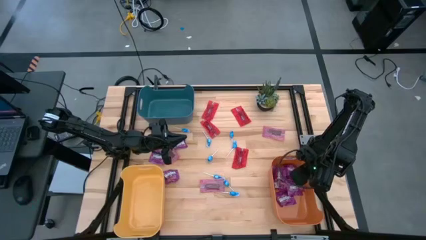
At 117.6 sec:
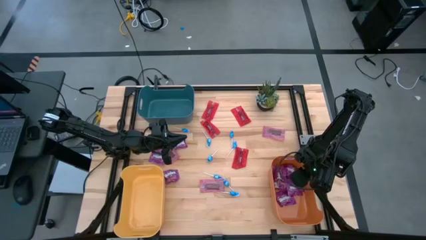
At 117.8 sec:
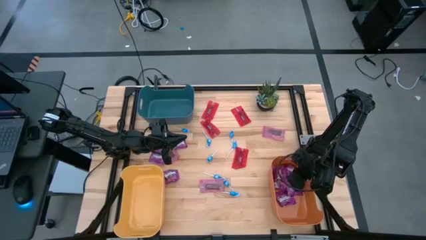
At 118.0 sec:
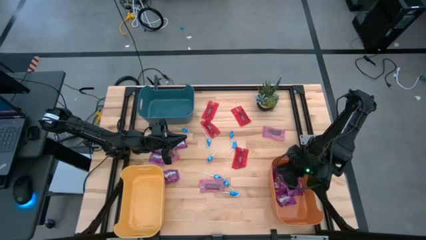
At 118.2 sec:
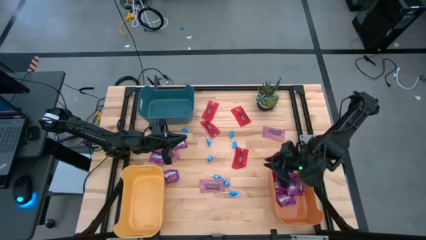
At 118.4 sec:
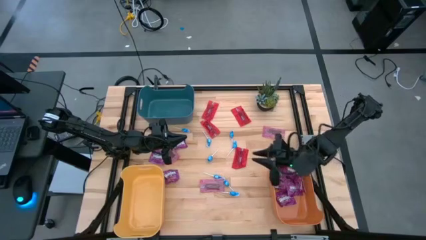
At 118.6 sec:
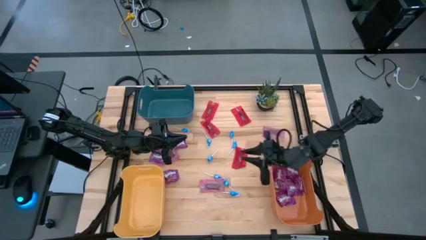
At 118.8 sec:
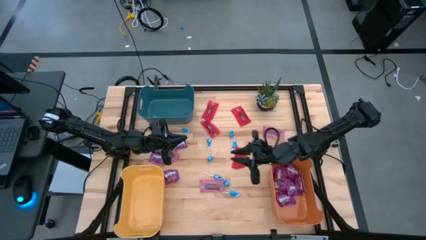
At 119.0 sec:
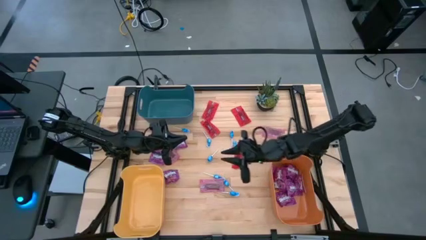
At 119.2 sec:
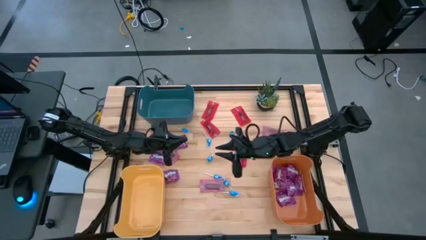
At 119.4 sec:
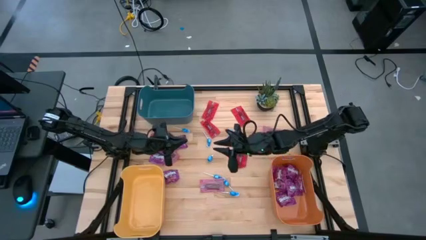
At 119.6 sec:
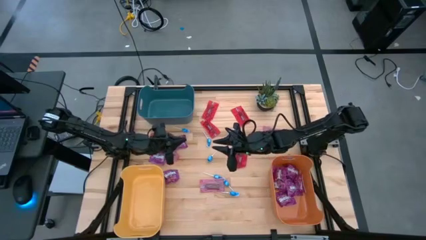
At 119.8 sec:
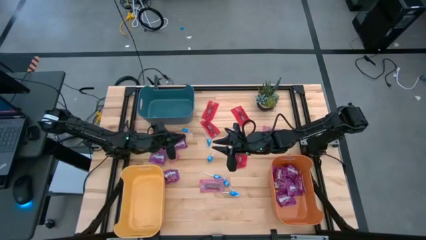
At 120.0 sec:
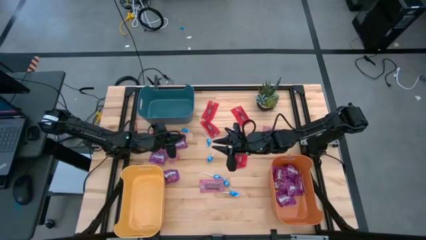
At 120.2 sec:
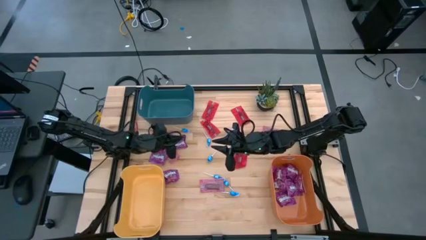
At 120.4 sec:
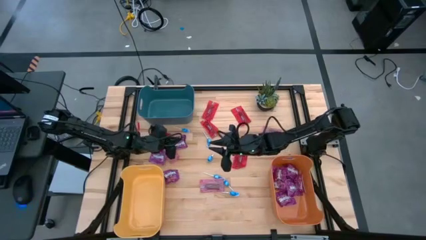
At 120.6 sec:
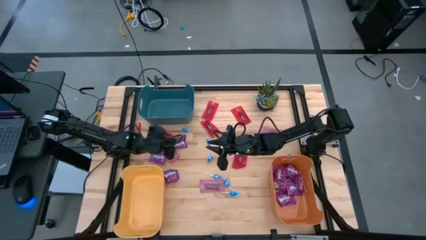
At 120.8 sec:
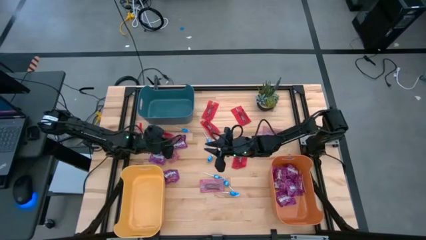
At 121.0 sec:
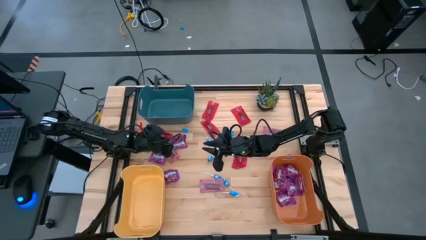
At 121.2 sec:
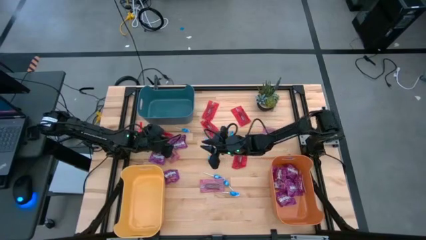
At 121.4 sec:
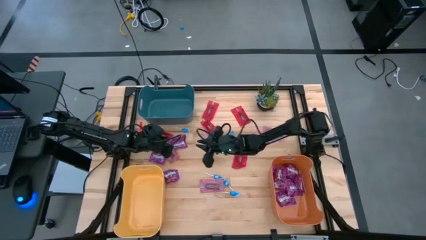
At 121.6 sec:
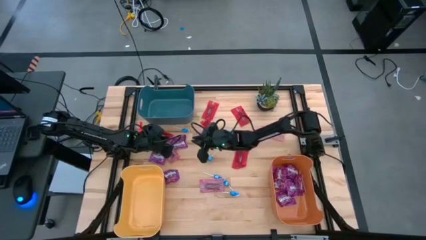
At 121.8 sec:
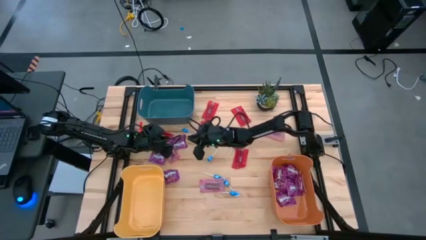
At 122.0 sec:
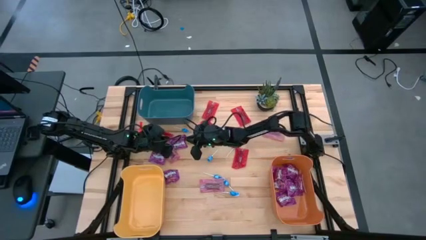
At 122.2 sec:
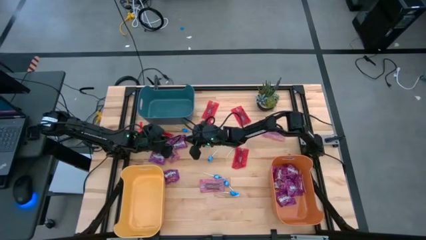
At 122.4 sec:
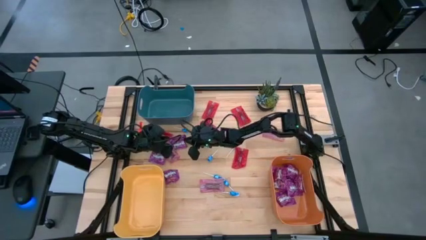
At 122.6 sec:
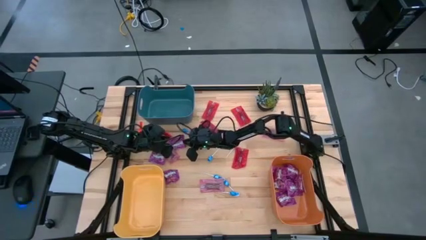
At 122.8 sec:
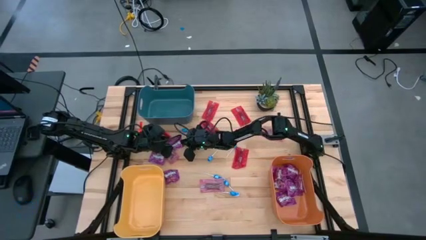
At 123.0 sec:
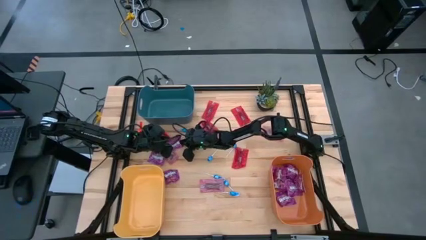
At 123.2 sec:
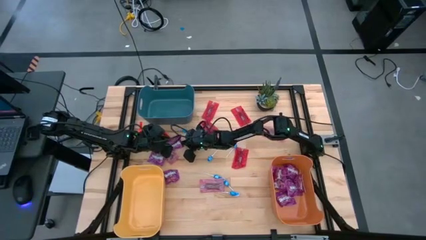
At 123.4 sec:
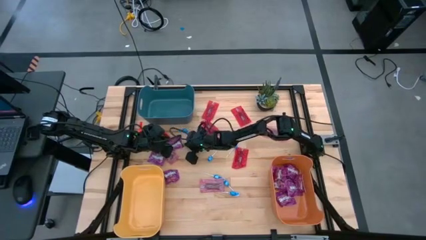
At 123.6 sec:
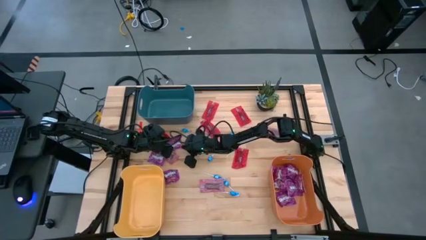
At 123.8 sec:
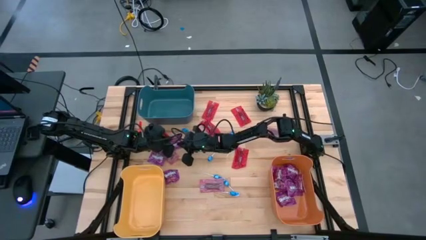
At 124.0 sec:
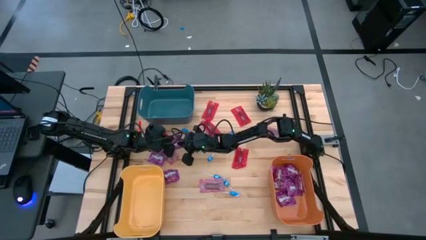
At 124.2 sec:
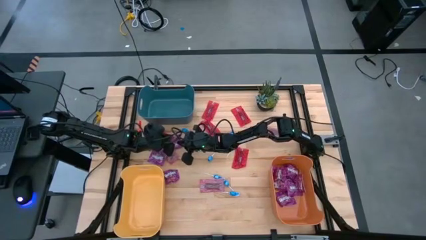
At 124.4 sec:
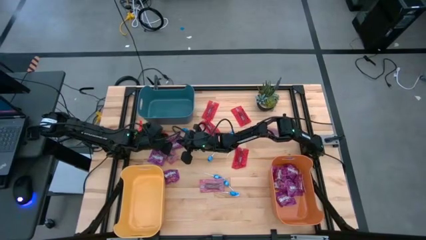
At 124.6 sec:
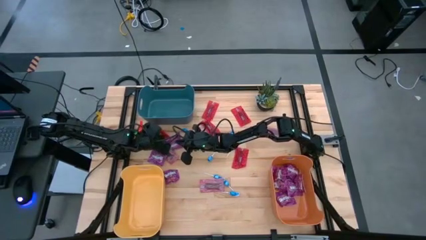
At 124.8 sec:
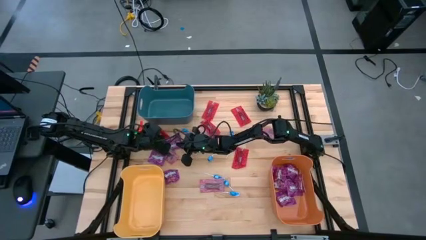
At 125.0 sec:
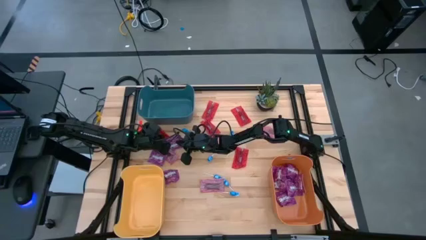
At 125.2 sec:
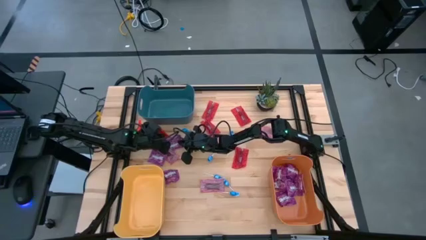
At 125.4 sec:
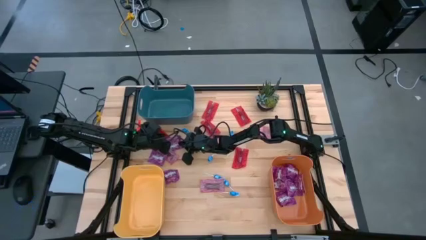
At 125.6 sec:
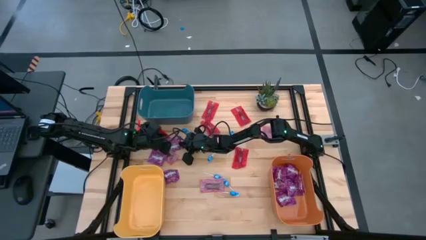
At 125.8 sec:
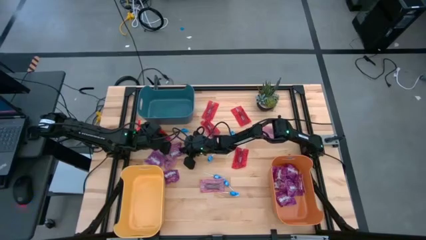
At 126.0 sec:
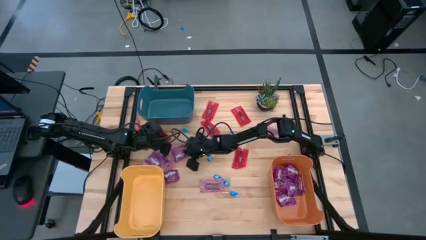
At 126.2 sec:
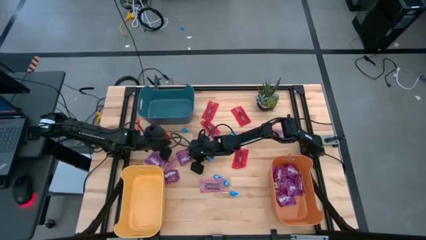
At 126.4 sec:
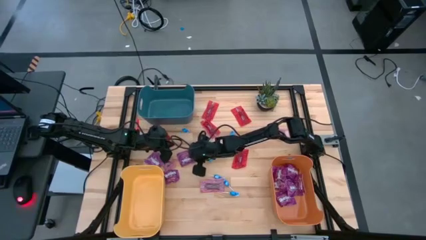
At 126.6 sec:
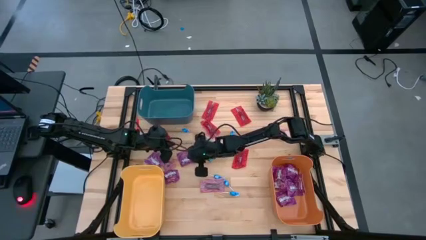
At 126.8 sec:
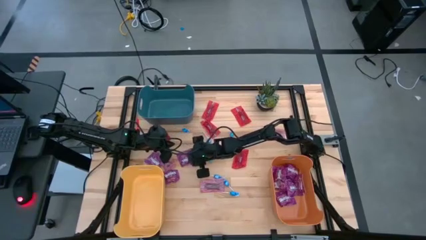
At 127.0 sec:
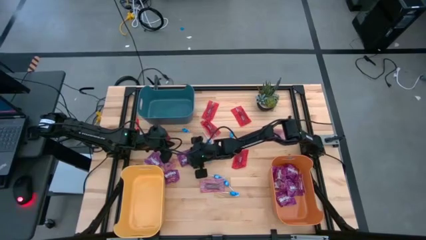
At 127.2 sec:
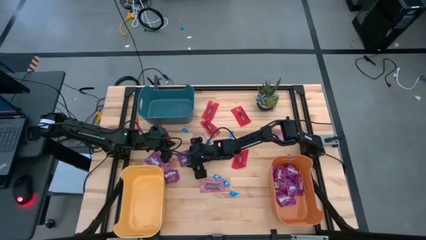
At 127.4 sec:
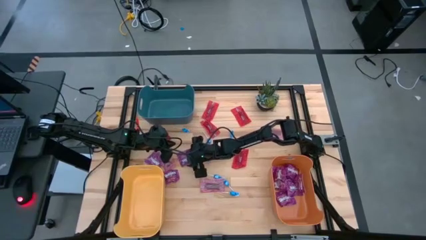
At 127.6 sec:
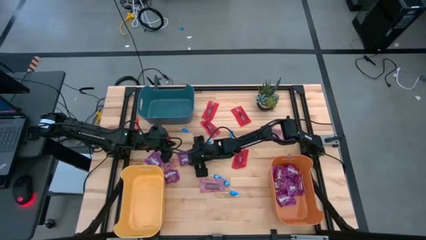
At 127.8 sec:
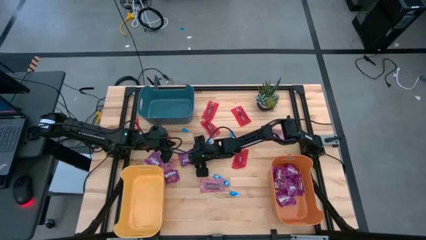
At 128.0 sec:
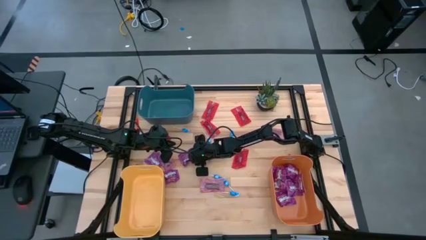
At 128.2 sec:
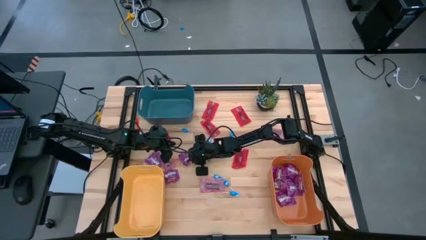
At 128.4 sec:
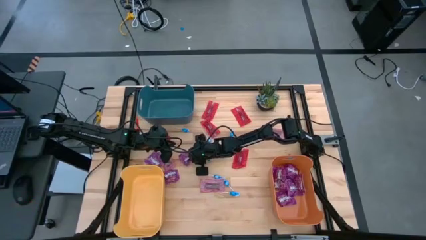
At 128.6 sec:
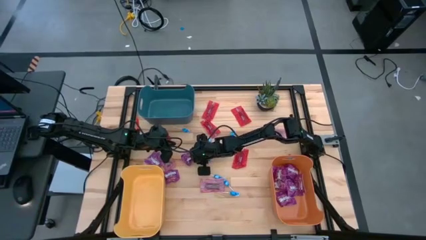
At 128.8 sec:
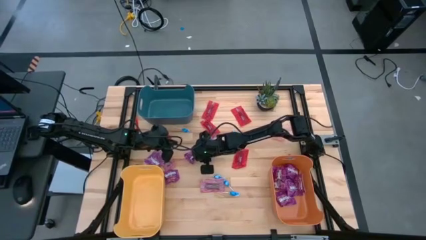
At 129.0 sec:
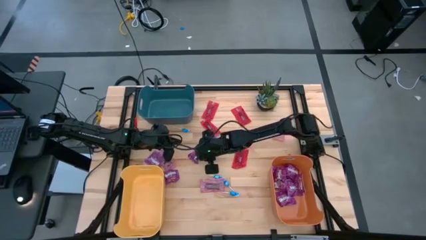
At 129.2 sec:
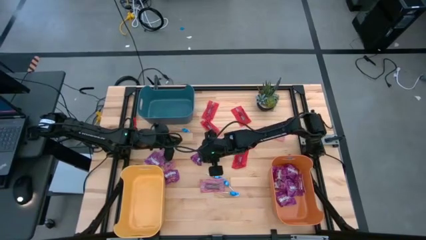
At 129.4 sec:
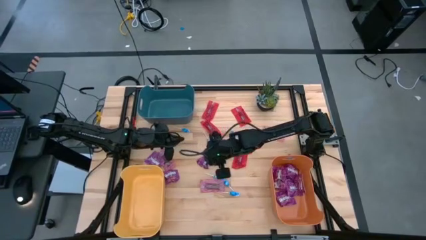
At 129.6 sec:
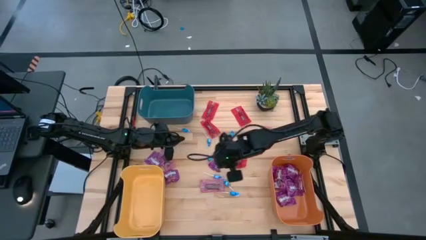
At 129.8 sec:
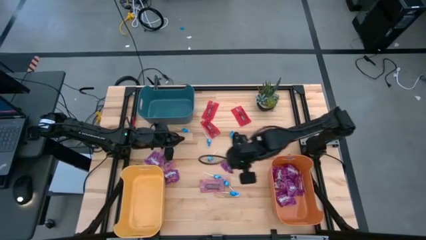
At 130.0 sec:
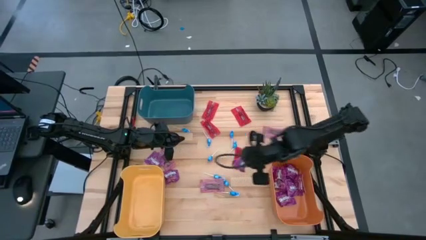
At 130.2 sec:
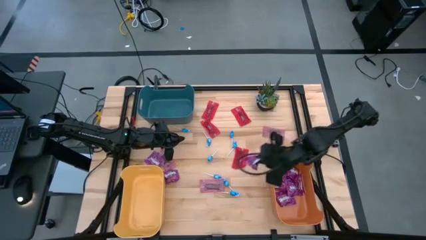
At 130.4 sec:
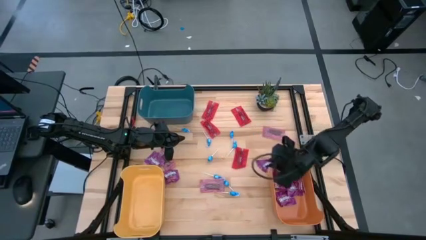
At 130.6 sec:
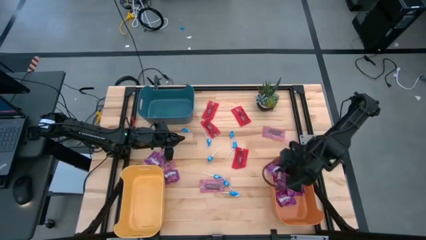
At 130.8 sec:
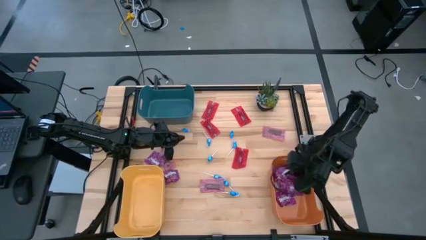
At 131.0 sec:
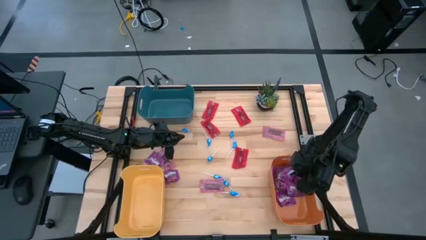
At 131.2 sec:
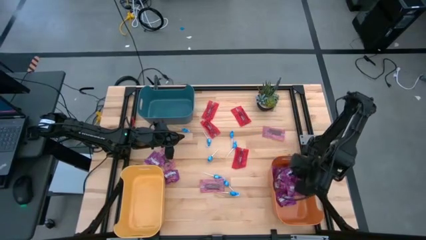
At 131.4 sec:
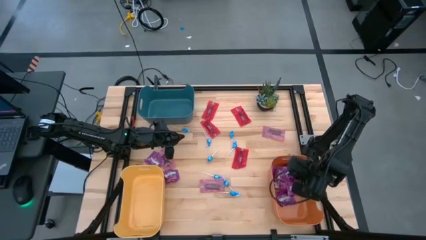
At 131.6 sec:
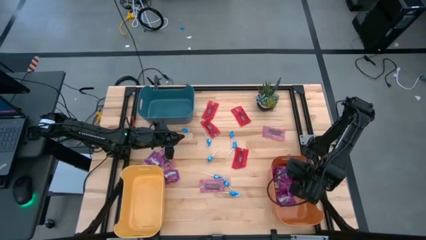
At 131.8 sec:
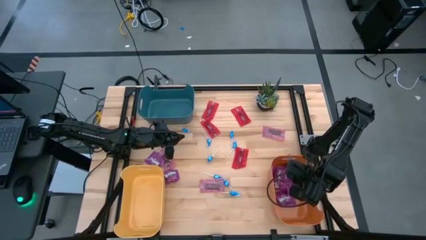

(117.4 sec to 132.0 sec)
Task: Sort candy
Put the purple candy into the orange bin

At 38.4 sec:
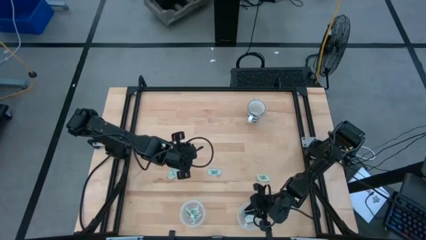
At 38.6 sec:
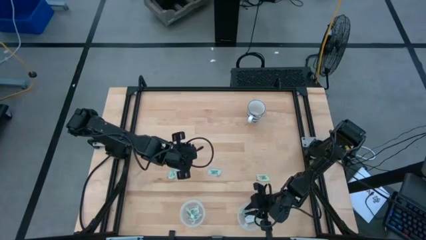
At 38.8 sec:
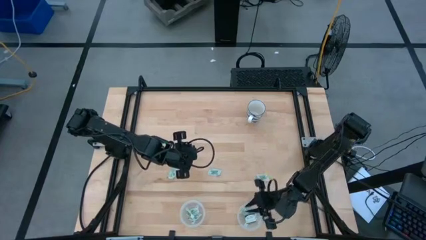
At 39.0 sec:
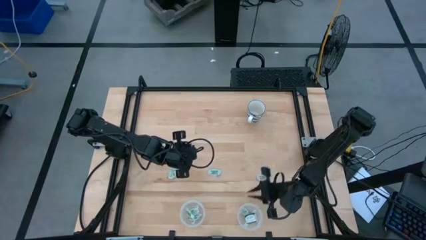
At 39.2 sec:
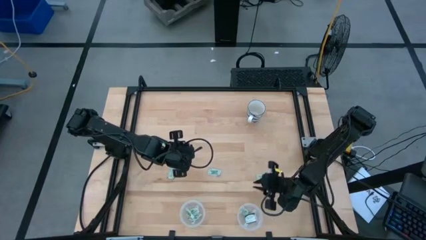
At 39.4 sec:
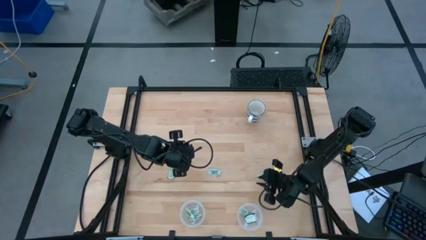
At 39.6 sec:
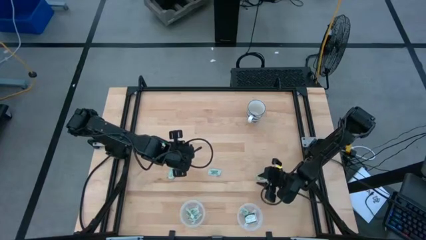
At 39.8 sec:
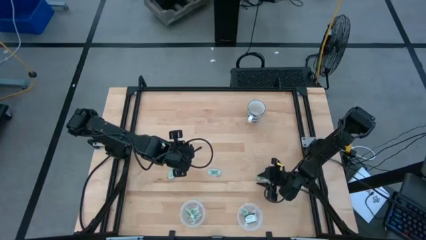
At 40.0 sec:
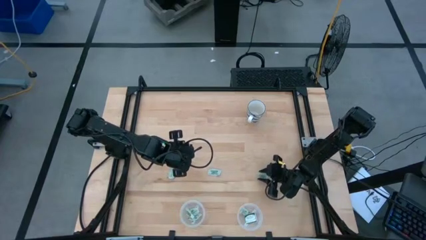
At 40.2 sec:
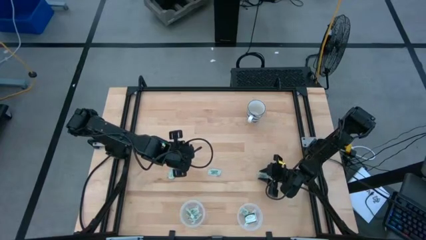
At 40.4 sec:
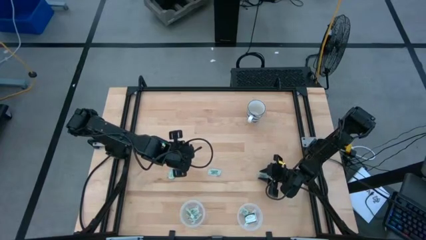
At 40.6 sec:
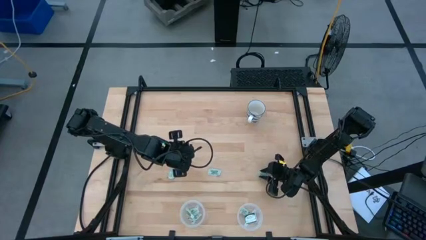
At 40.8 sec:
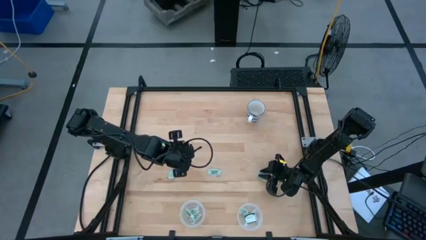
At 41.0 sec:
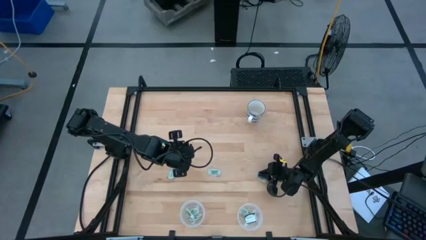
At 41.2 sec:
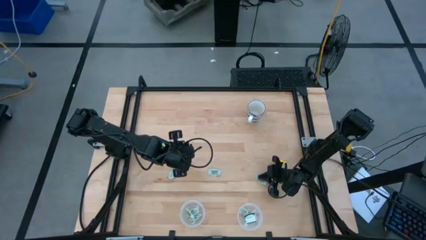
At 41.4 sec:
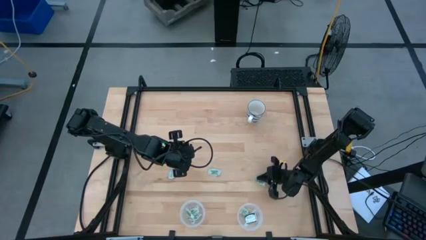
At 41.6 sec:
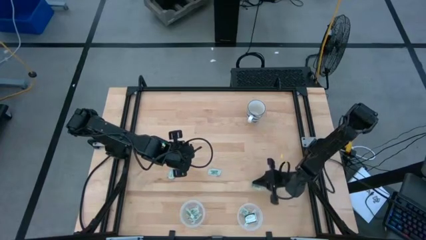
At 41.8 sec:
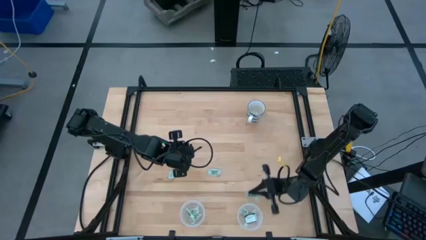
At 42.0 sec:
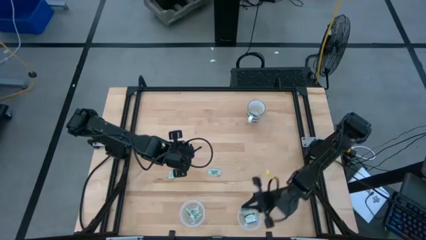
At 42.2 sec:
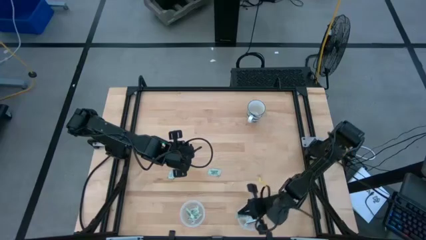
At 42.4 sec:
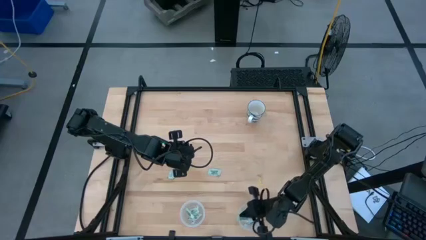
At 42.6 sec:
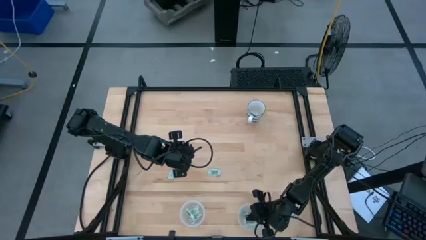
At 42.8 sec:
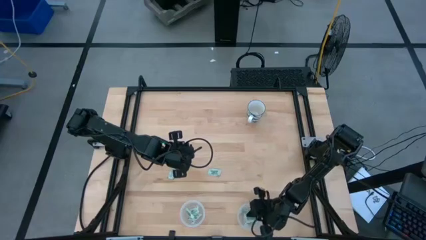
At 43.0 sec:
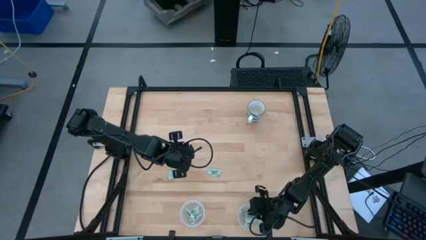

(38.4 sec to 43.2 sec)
Task: Pick and place Stevia / Truvia into bins
Put the white stevia packet into the right transparent container
